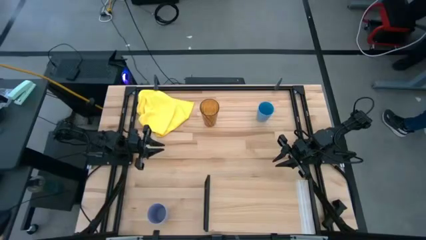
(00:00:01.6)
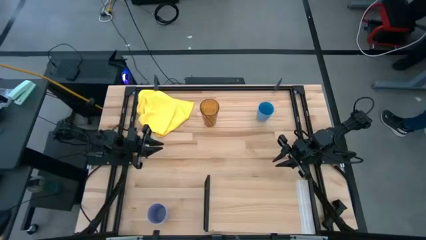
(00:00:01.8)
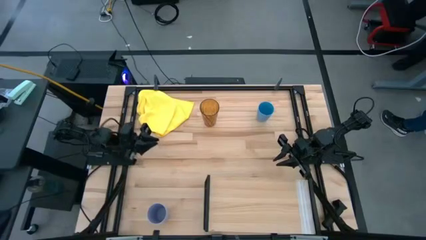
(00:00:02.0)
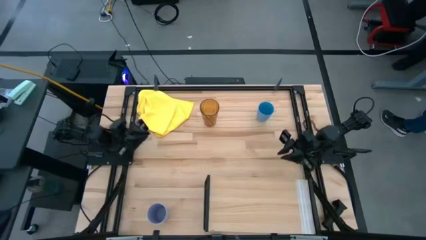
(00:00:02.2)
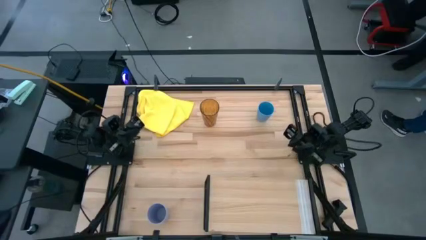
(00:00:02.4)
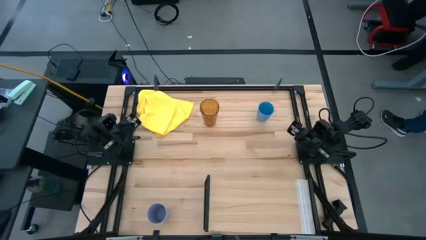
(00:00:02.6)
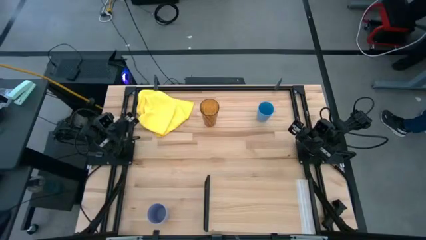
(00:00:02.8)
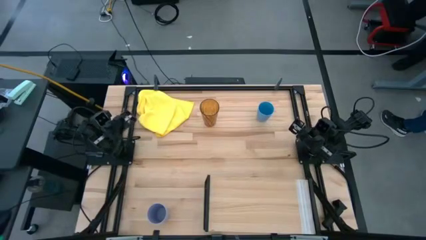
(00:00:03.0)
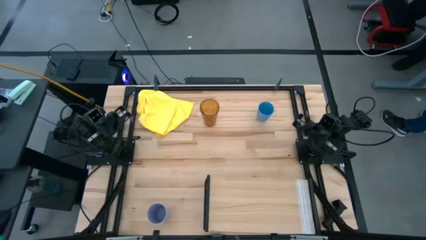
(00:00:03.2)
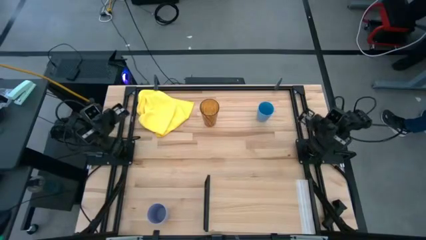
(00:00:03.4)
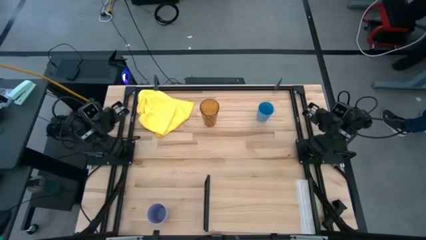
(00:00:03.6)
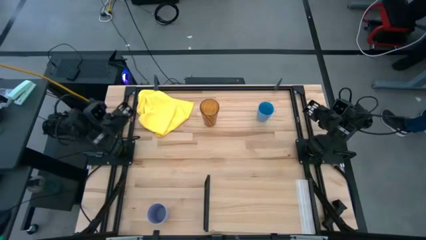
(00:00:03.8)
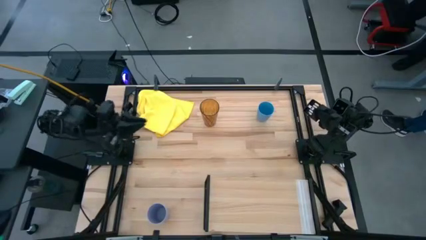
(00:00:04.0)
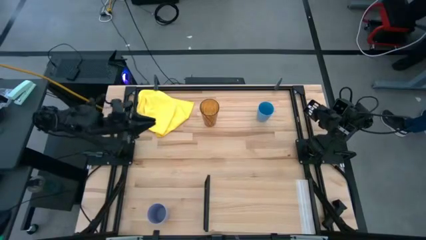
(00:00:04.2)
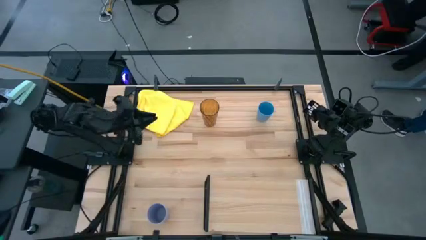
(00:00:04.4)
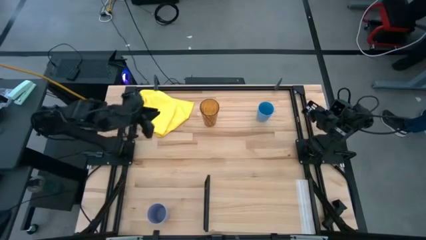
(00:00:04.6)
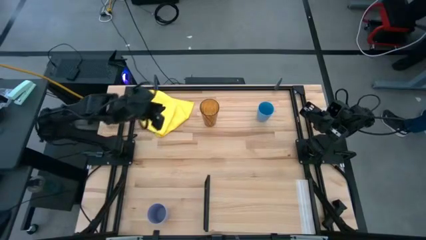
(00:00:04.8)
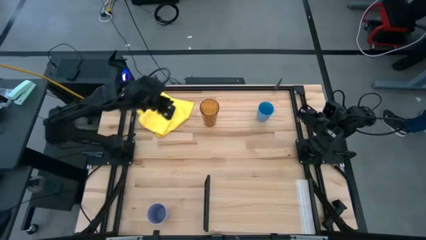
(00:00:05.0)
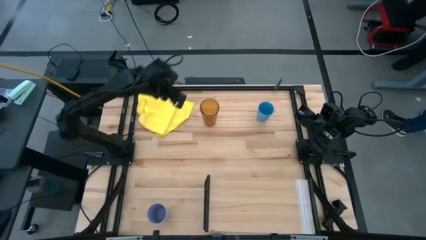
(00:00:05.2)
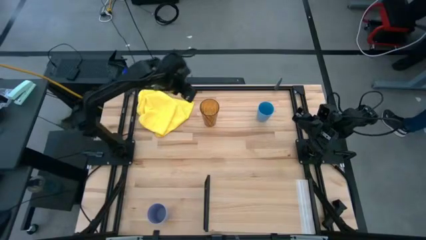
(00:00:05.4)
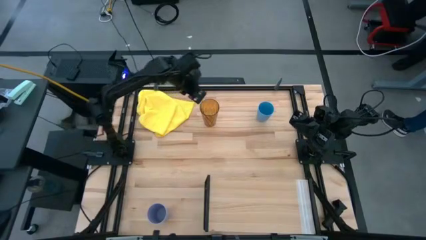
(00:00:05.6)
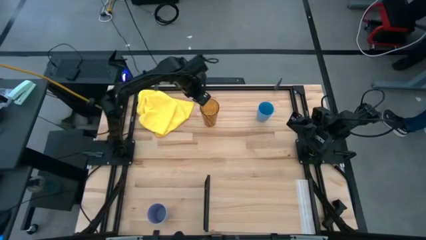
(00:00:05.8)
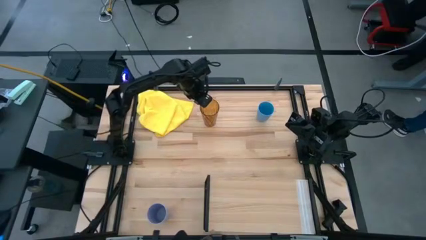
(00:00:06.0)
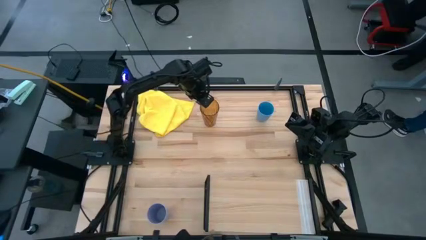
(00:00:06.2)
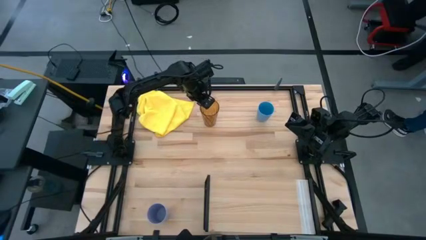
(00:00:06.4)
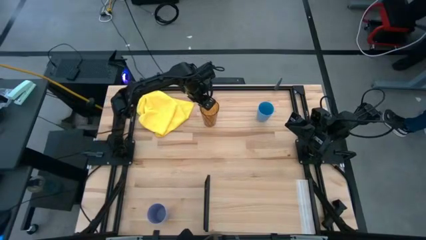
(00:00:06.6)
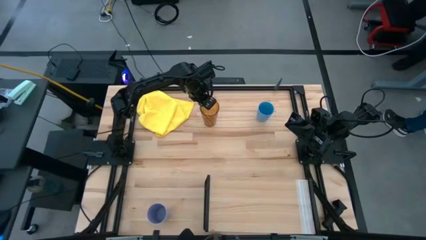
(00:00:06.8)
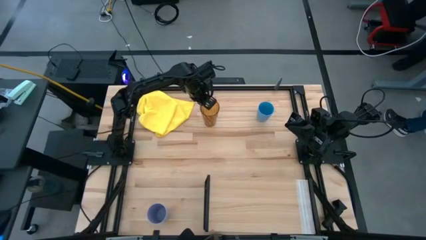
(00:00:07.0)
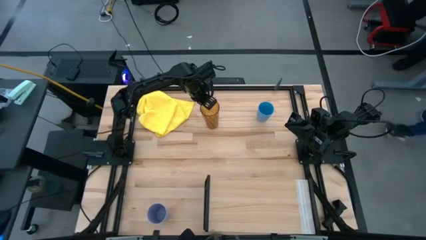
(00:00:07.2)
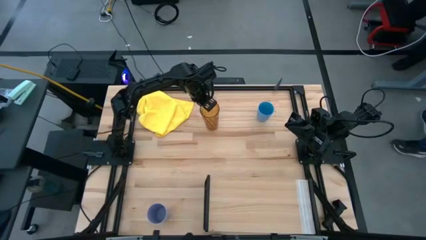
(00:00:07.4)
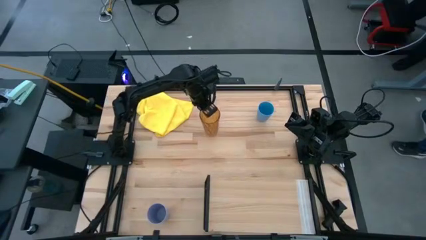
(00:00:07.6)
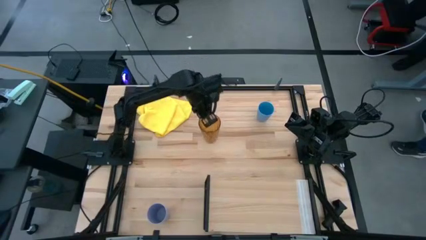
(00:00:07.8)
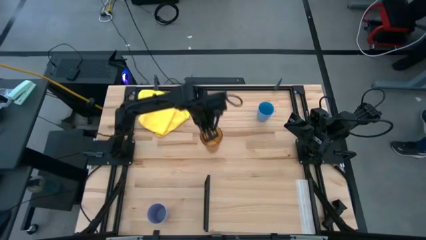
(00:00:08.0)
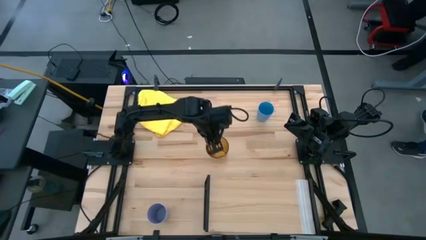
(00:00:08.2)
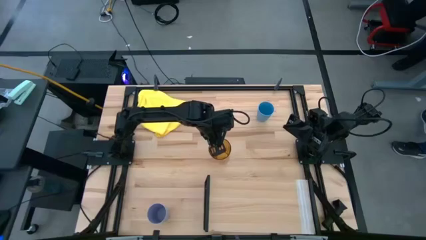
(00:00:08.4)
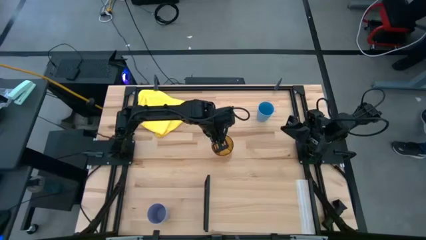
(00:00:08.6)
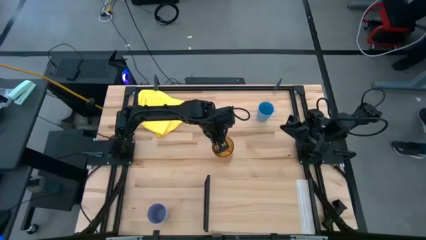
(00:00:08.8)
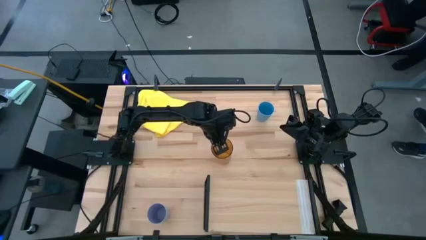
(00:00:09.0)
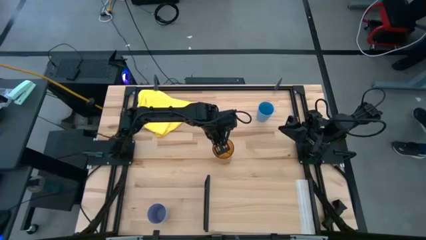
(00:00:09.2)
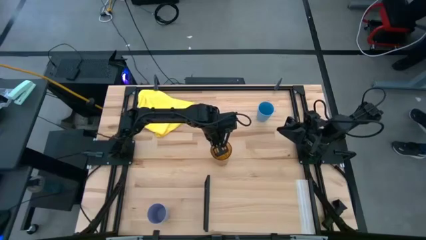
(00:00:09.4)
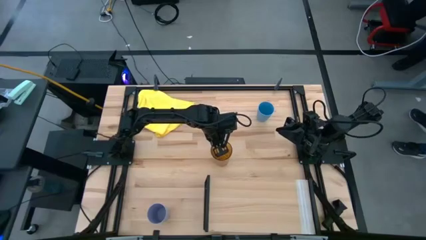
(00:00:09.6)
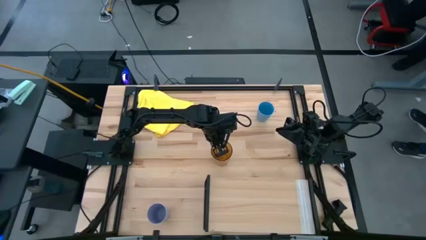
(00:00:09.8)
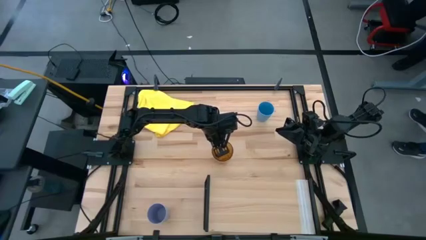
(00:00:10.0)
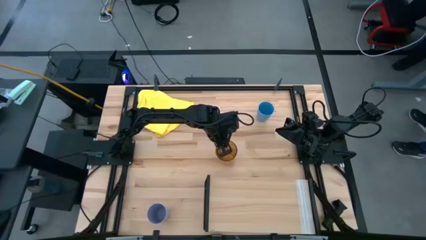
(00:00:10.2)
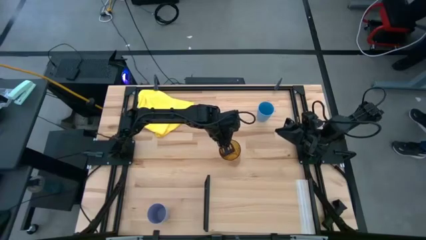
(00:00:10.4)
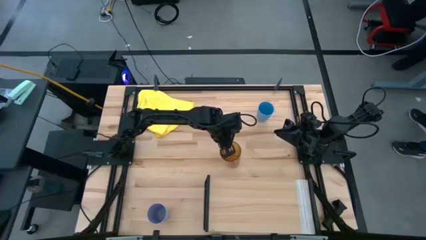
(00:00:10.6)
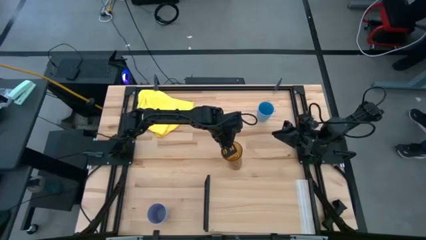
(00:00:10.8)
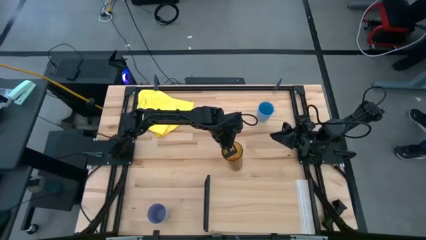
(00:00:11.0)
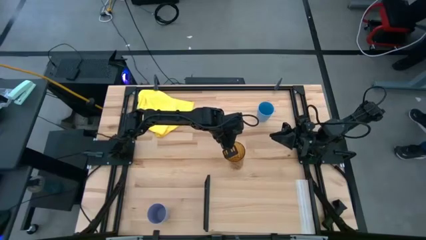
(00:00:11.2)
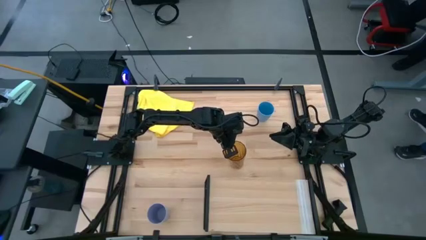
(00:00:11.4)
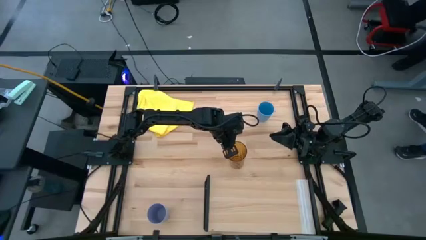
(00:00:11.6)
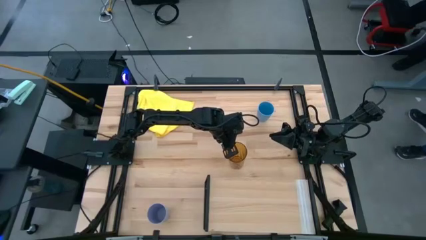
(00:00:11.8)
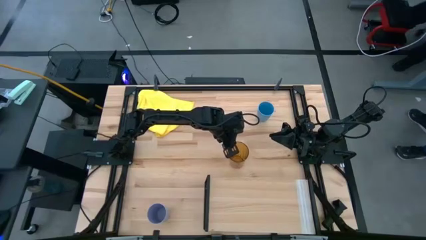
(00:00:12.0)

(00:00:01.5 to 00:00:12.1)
Task: Stack small to large cups/mugs on shelf
Put the brown cup on the shelf

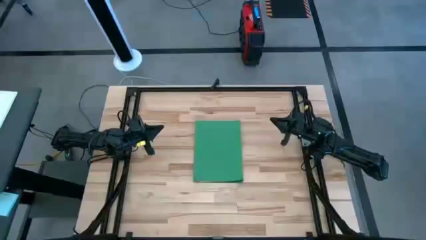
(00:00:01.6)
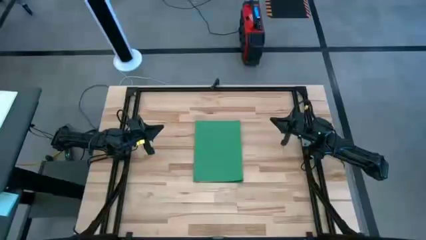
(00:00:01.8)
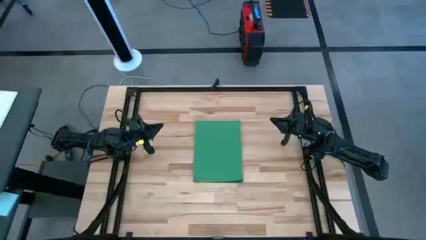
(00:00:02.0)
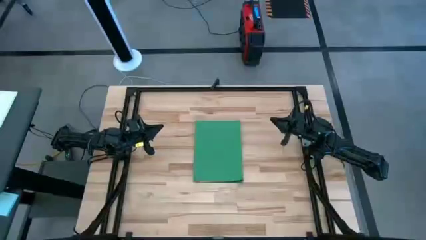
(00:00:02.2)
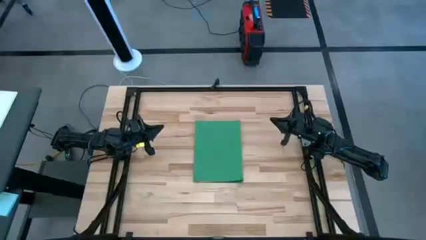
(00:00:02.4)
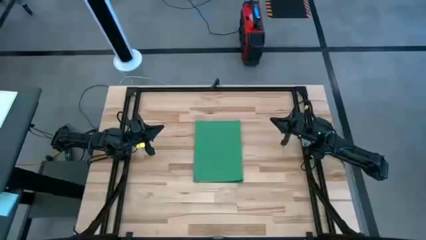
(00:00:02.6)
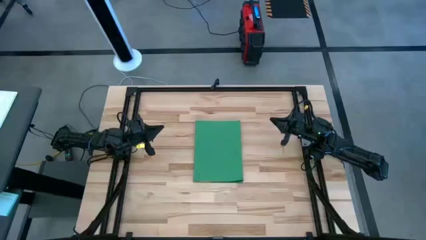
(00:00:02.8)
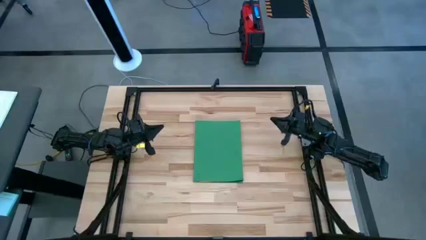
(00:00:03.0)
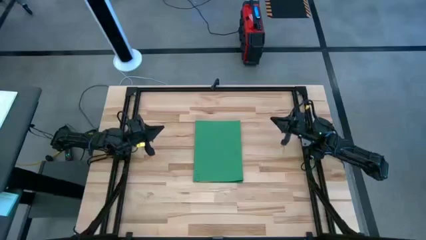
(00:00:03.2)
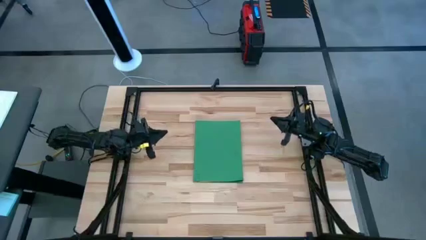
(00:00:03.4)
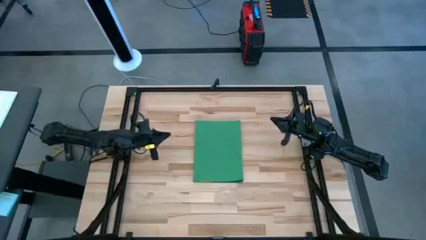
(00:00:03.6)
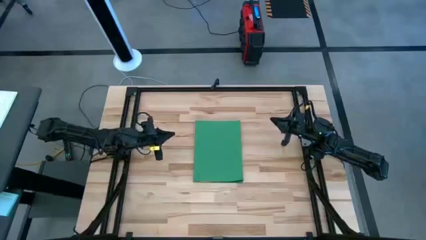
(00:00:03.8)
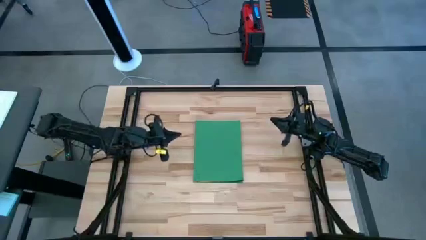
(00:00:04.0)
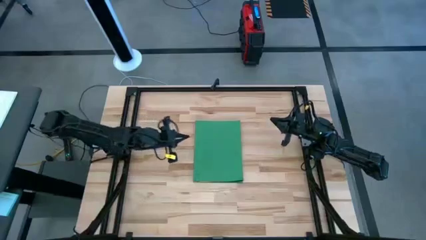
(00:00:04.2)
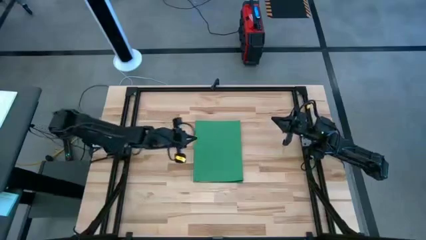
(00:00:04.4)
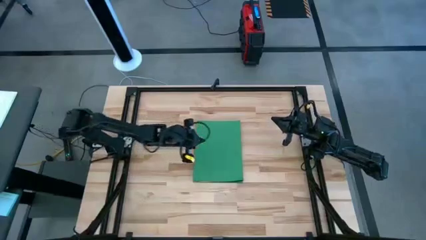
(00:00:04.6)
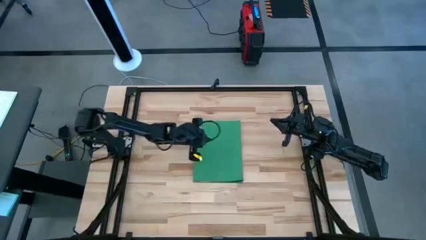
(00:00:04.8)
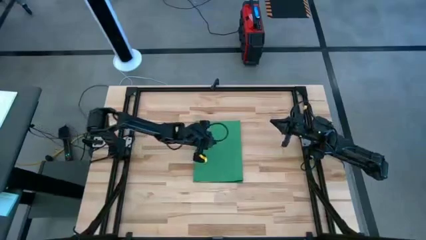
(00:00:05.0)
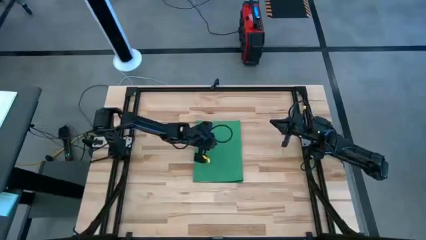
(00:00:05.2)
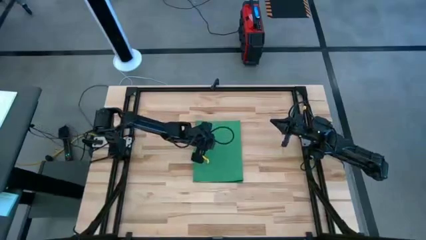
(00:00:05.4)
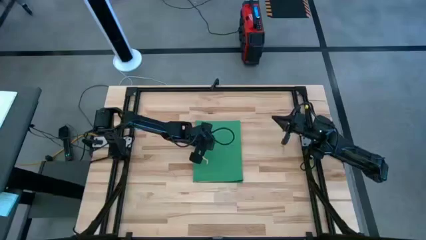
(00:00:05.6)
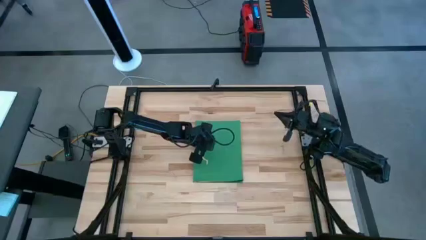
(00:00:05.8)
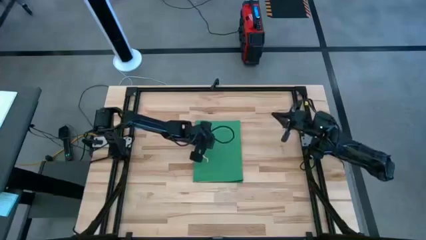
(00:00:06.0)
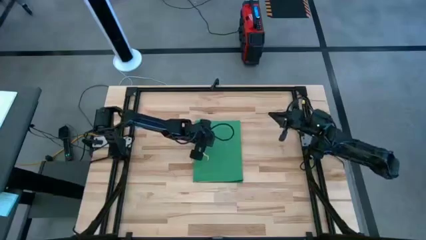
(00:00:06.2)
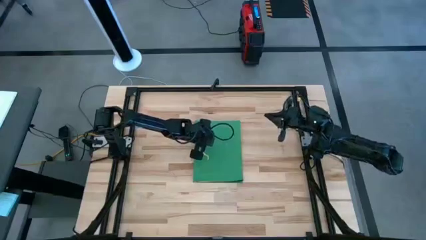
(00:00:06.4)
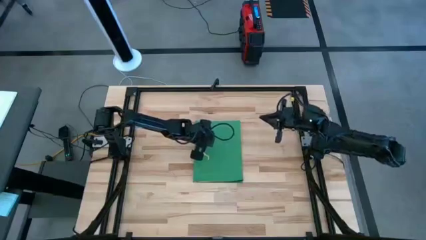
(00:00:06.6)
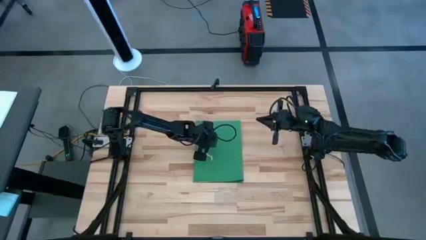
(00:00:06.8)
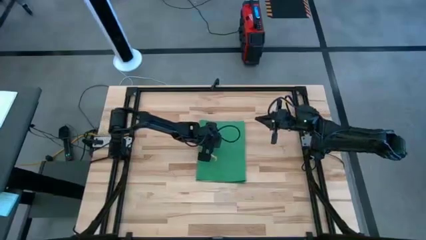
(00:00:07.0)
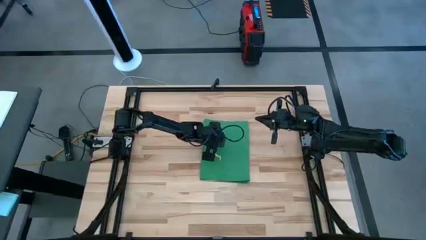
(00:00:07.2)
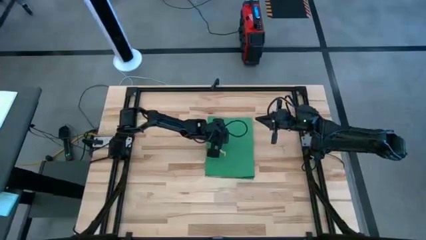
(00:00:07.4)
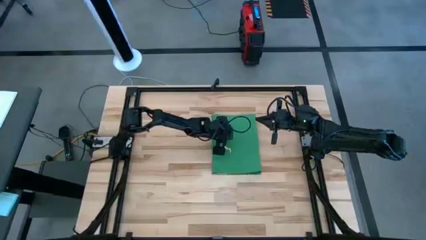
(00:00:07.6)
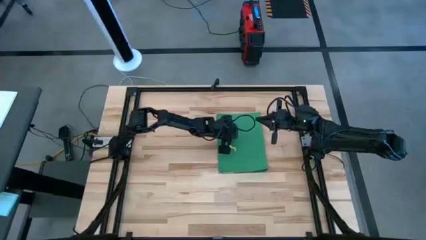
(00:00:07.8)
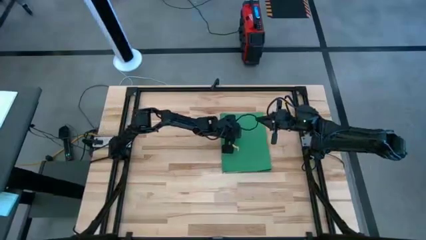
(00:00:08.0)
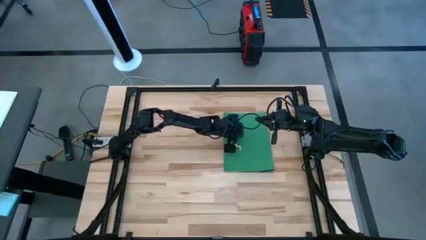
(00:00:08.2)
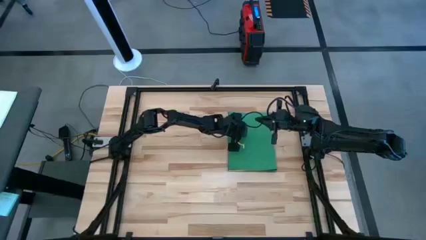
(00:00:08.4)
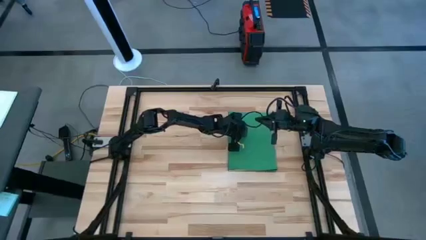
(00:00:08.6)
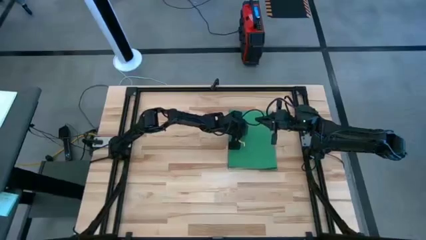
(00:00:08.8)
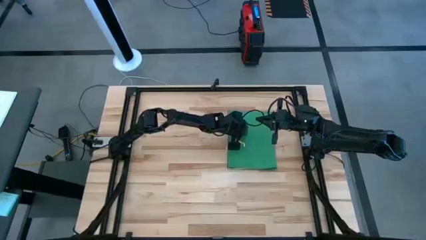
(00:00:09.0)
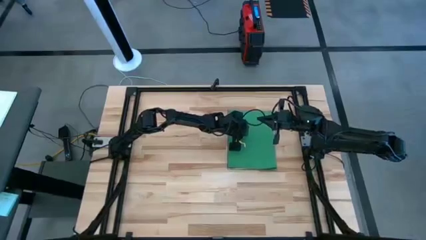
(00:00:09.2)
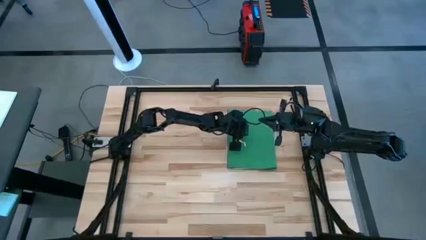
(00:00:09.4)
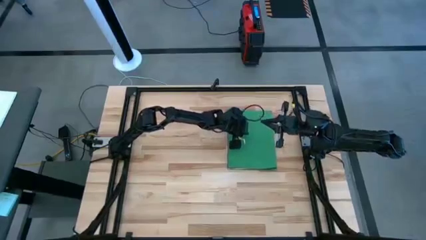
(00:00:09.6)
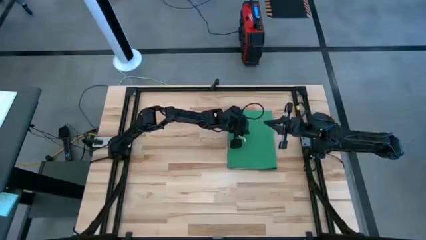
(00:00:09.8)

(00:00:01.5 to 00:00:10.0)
Task: Organize paper
Move the stacked papers to the top right of the table
